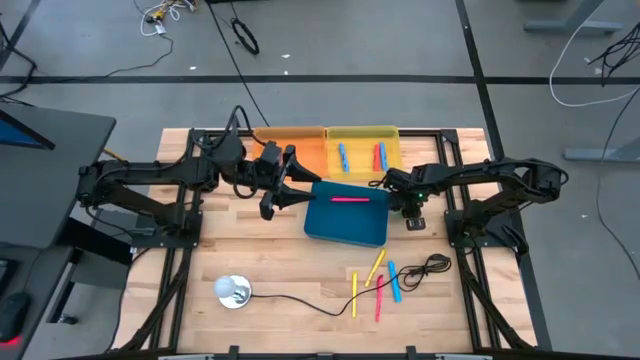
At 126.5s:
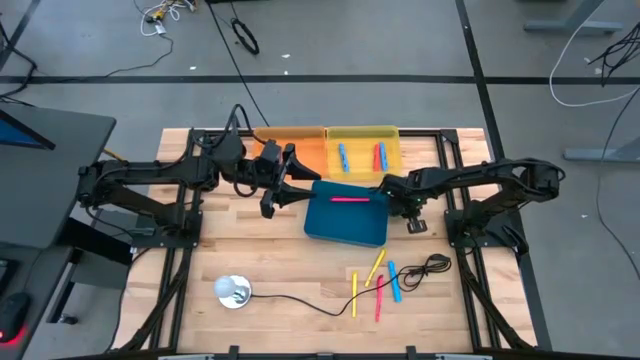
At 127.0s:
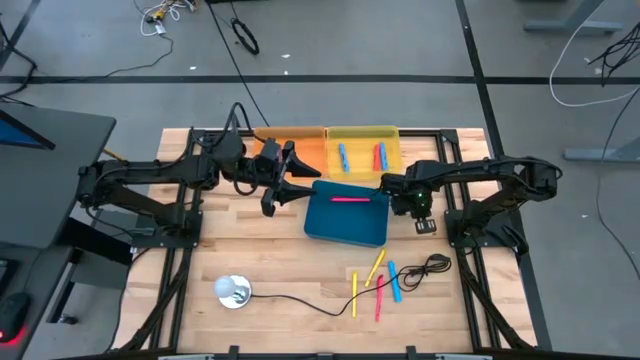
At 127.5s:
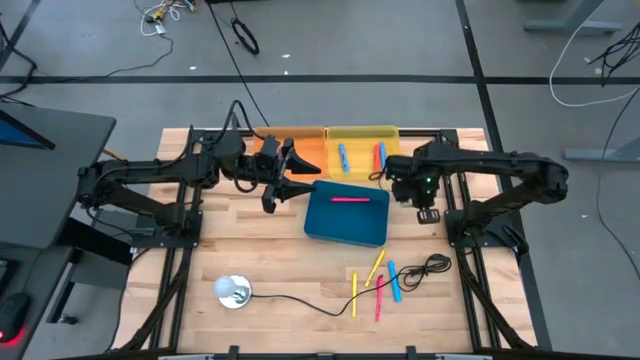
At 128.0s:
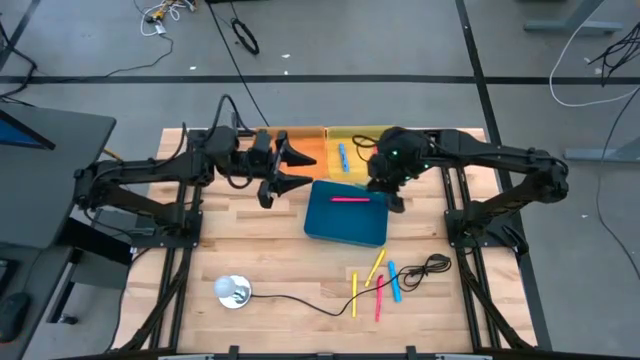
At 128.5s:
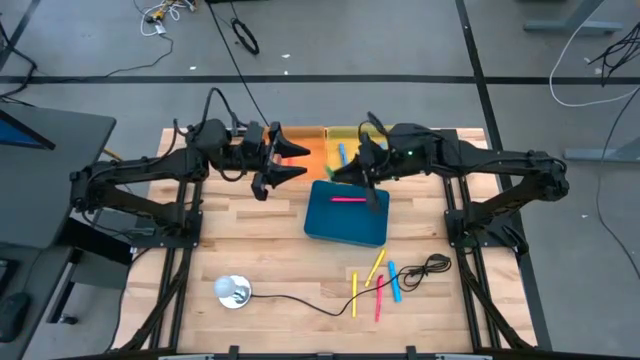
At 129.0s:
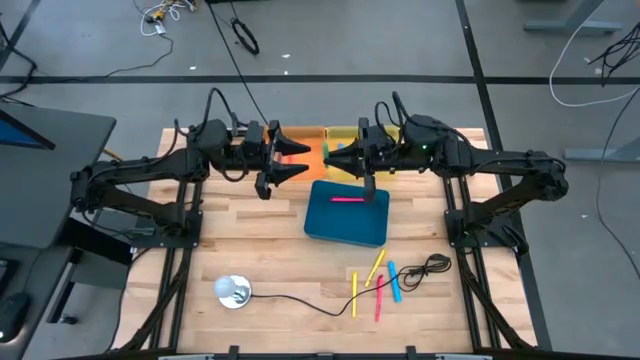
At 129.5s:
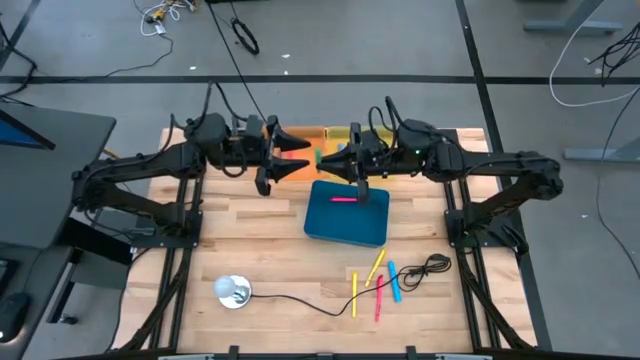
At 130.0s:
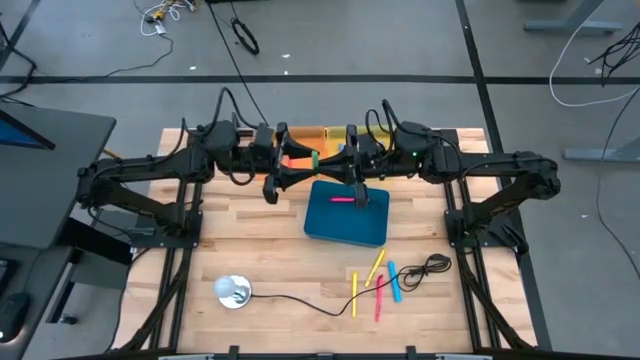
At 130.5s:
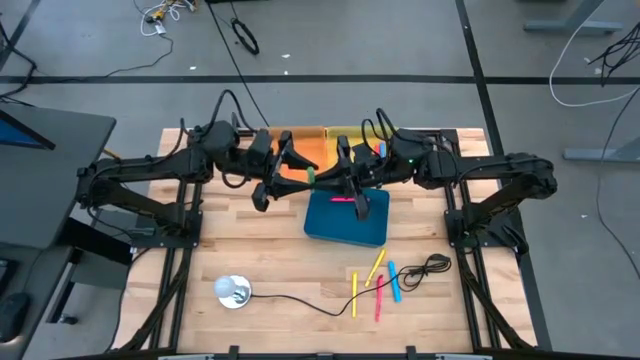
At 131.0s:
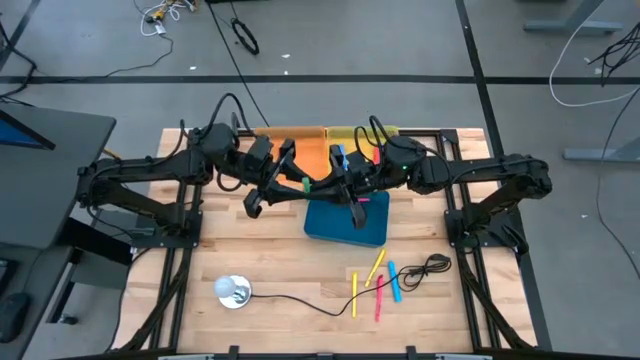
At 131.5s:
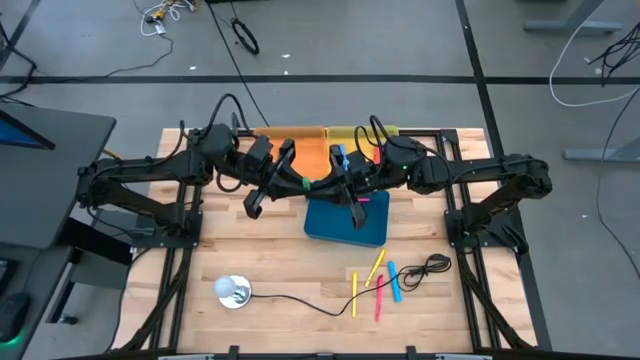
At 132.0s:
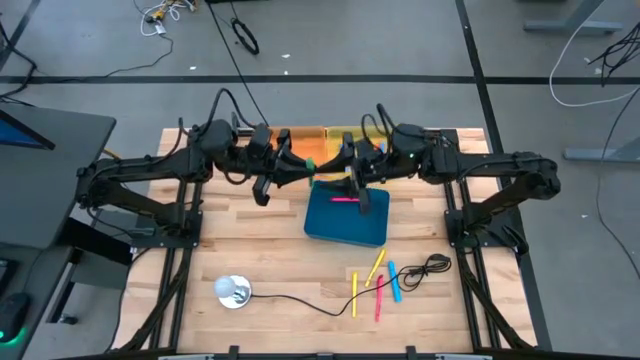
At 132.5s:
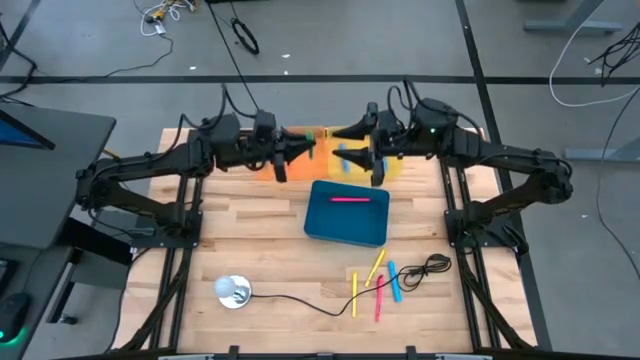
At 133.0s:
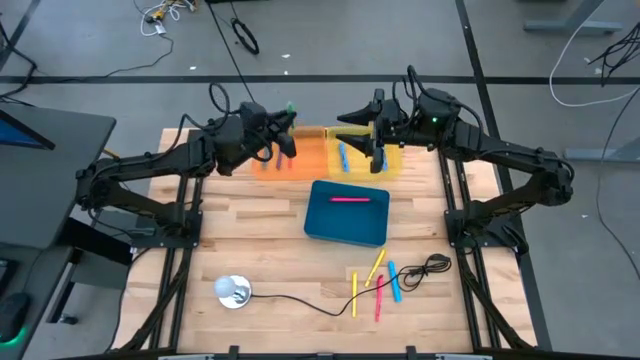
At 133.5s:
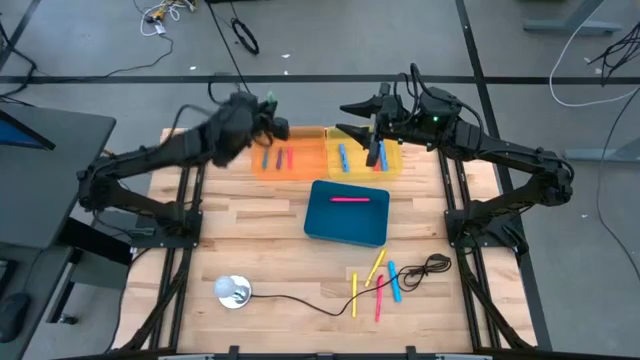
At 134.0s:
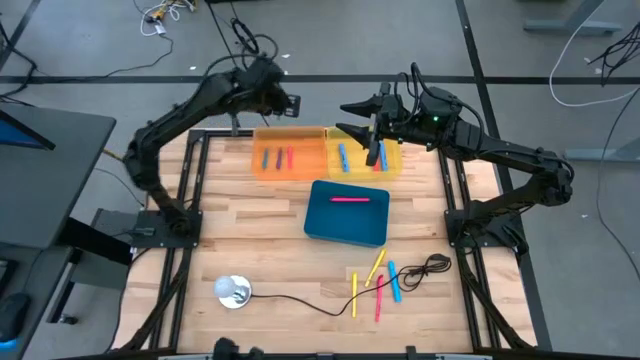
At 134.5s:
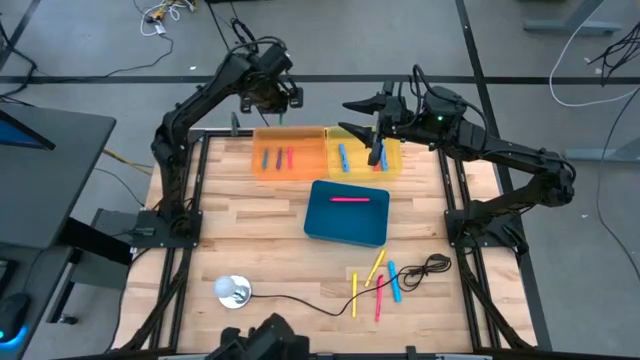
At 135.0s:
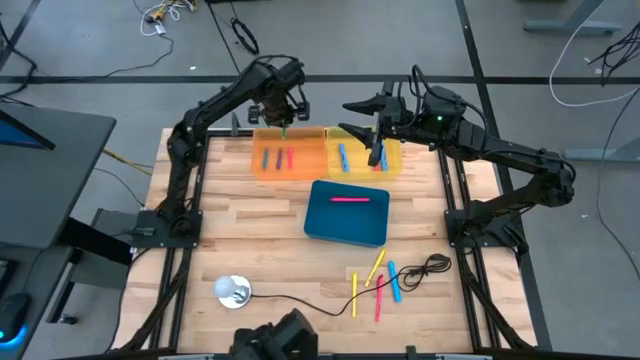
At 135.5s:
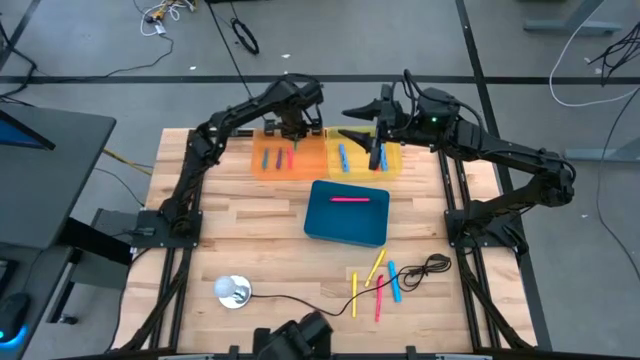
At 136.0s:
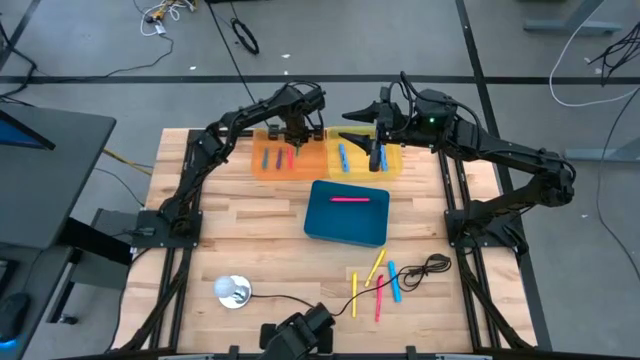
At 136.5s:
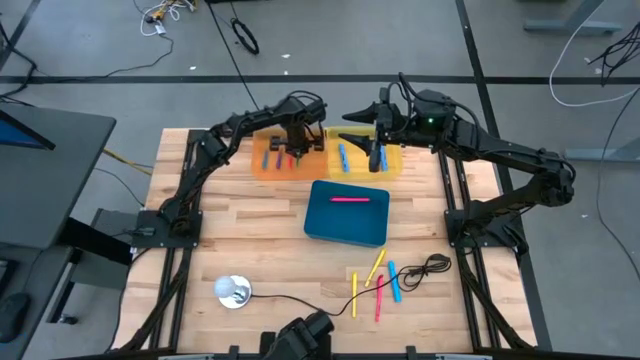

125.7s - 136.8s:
Task: Pick & Place Markers
Put the small green highlighter into the orange transparent bin

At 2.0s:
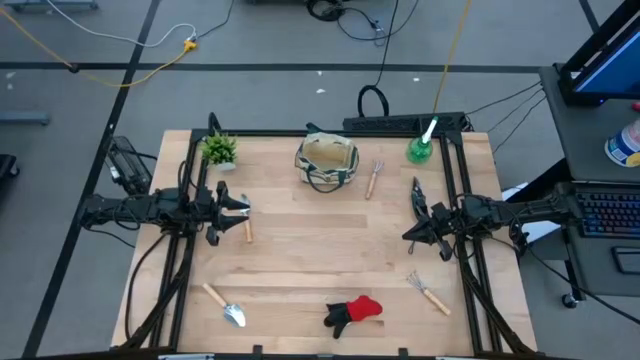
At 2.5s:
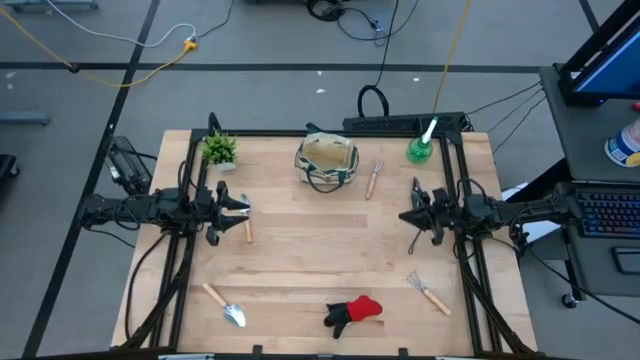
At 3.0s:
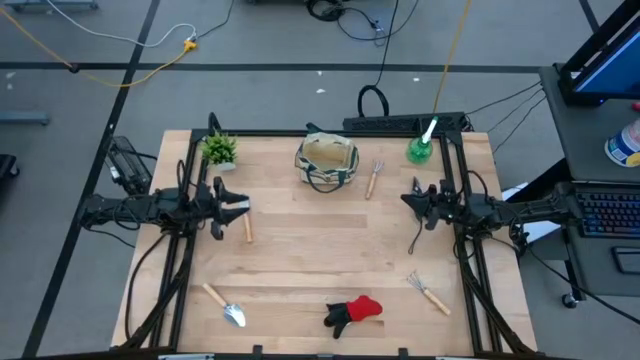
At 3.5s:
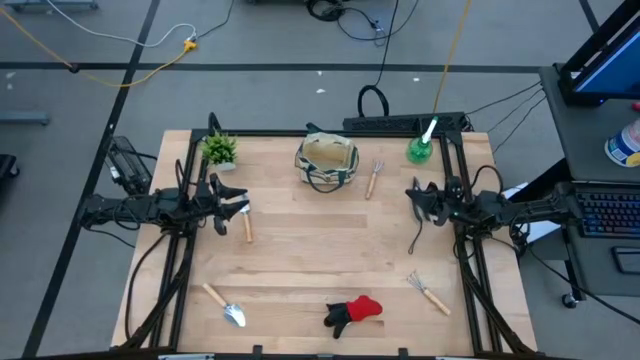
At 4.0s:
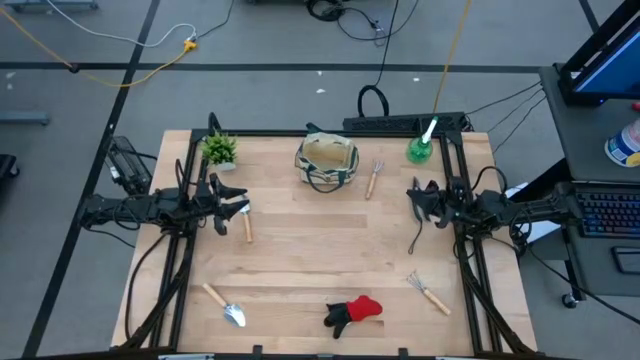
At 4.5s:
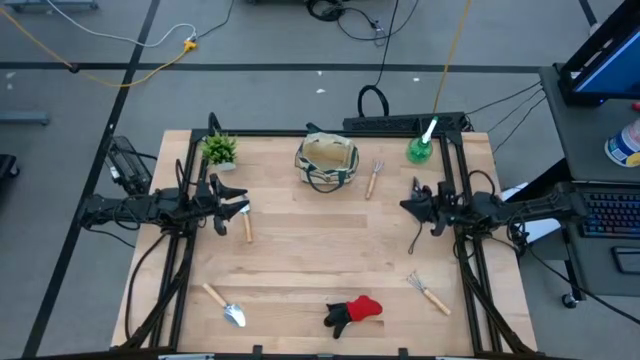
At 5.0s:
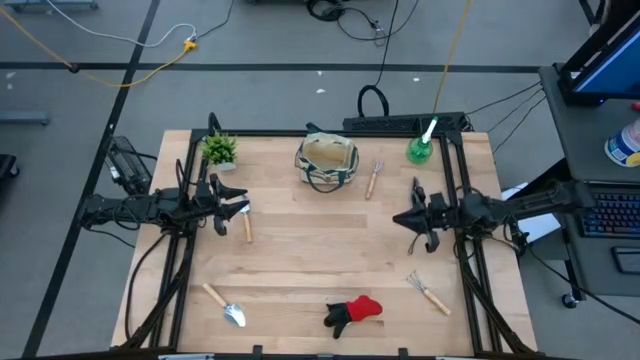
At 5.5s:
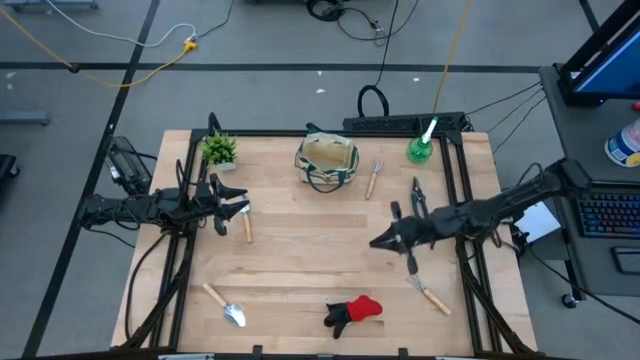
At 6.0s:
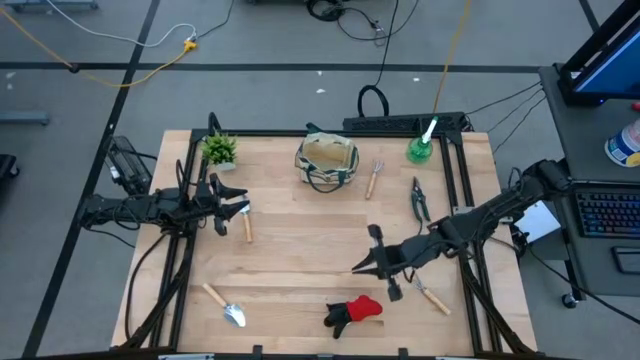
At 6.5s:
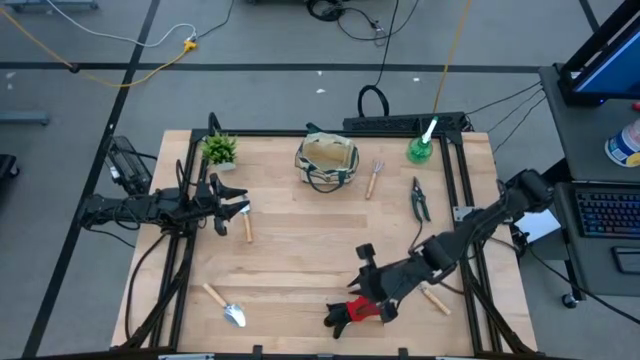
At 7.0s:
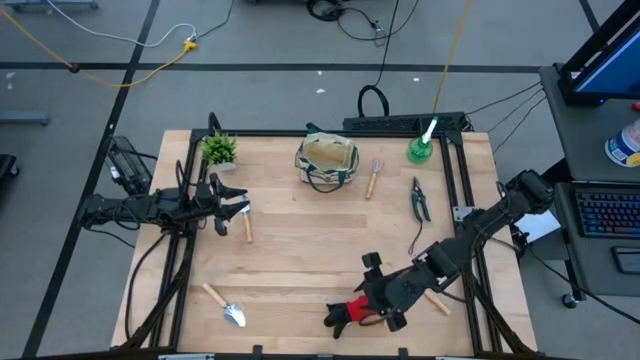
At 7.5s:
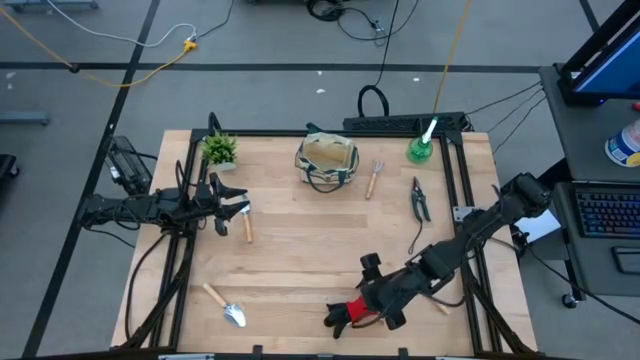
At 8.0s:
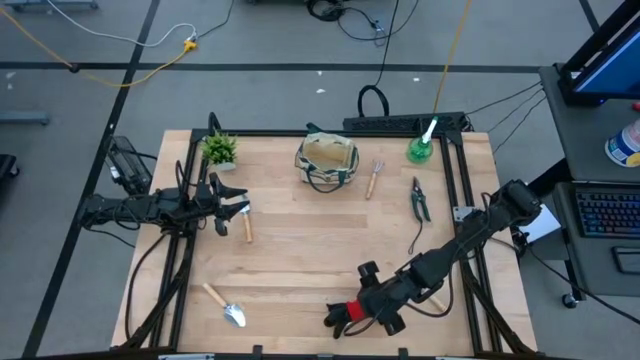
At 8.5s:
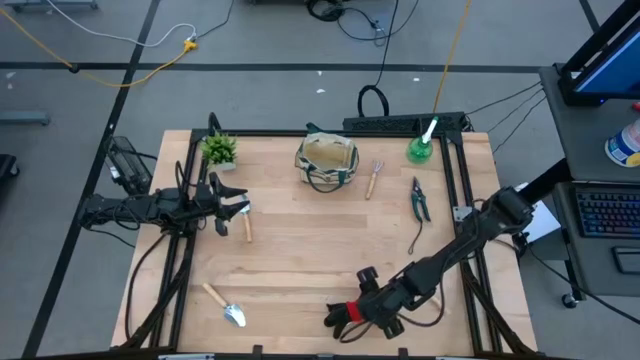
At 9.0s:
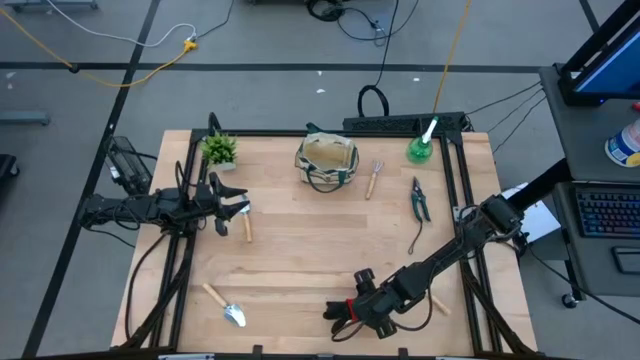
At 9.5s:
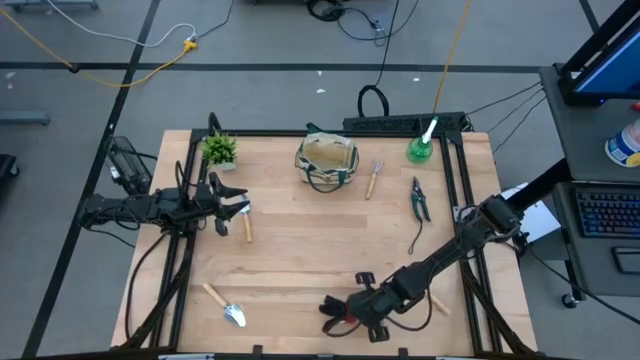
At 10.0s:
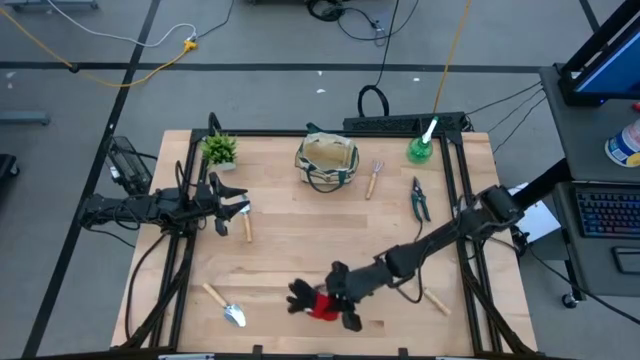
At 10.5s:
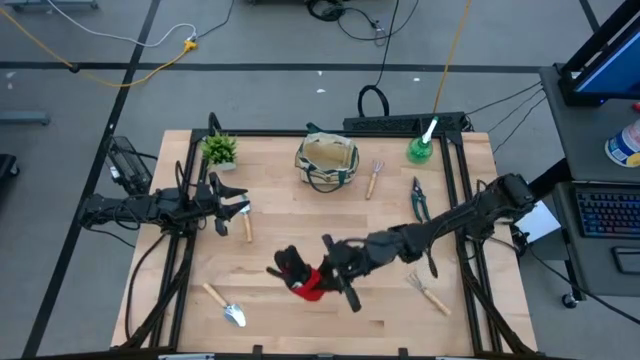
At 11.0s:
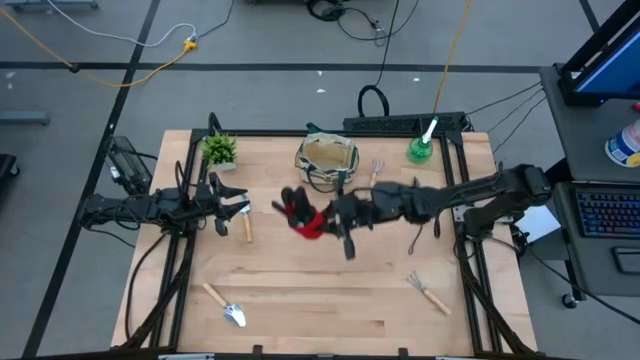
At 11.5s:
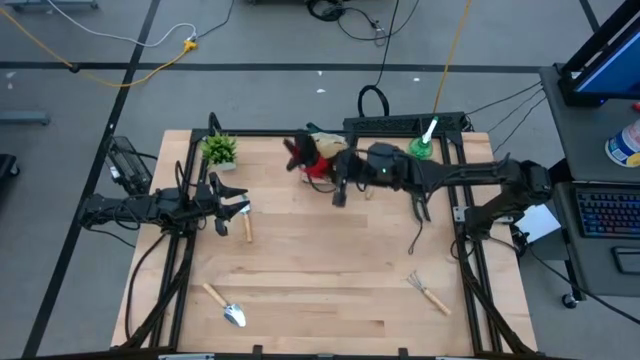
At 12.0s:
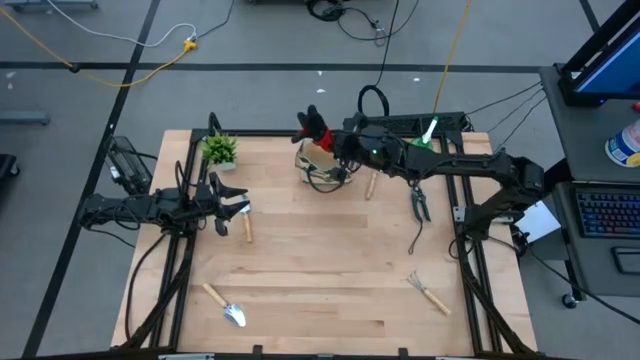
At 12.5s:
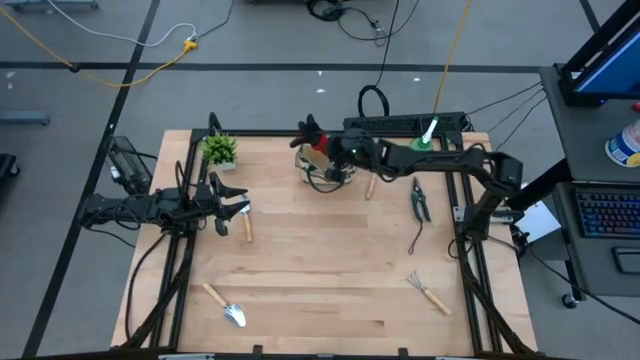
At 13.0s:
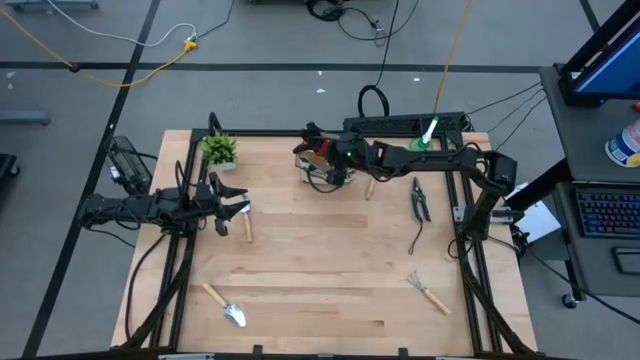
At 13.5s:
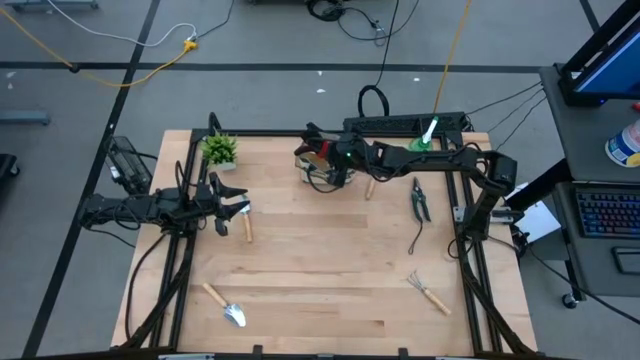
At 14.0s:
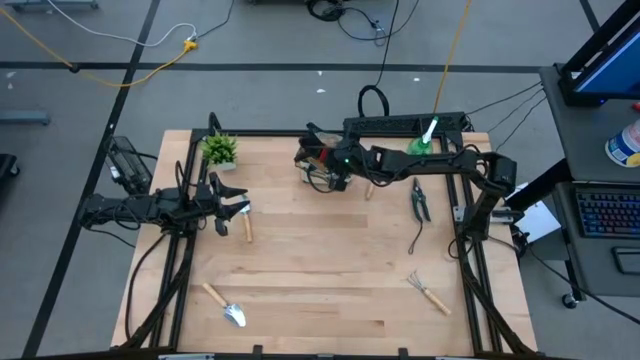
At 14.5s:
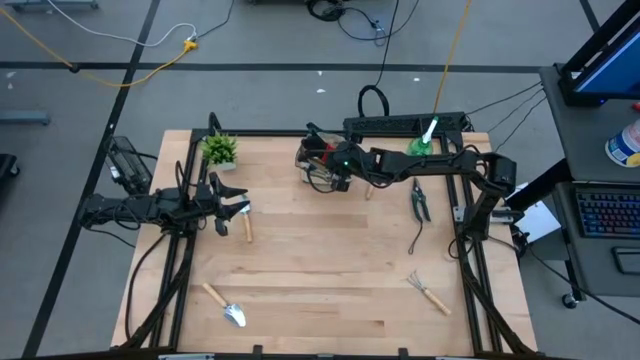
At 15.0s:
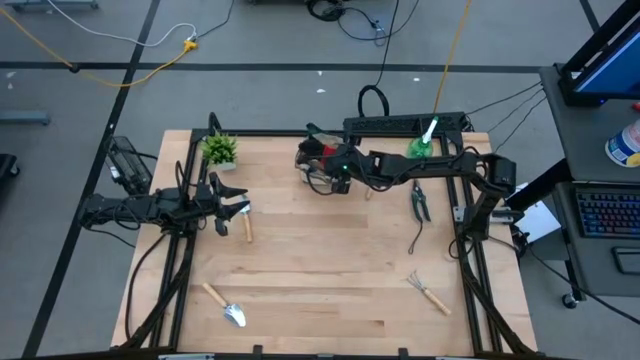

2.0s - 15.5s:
Task: Pick & Place Garden tools in Gardening bag
Put the red gloves into the gardening bag
